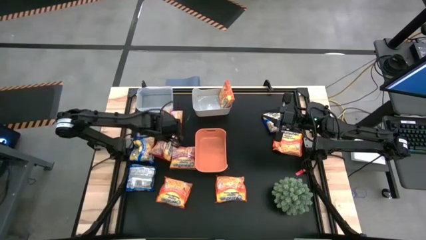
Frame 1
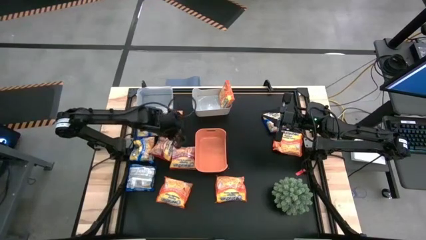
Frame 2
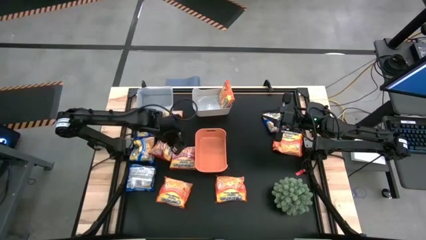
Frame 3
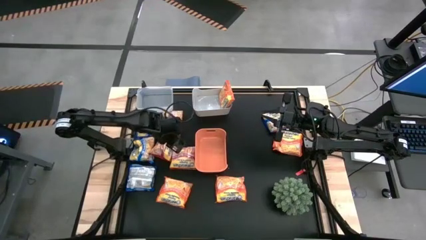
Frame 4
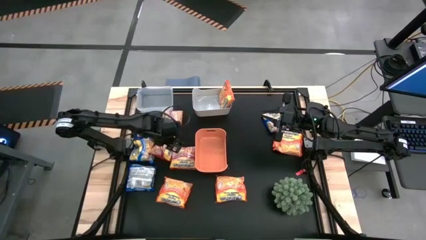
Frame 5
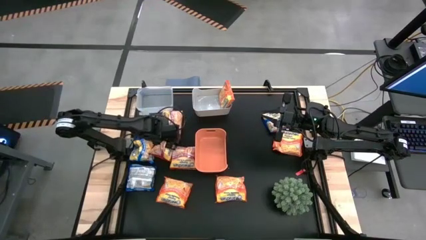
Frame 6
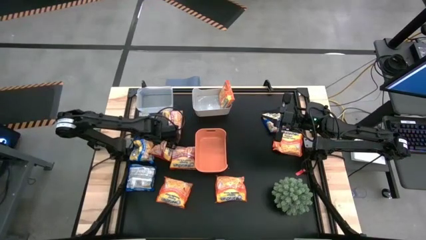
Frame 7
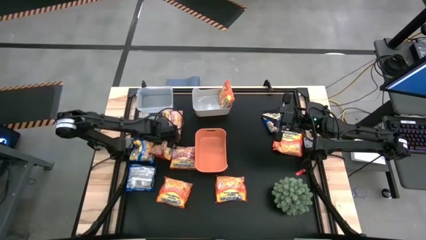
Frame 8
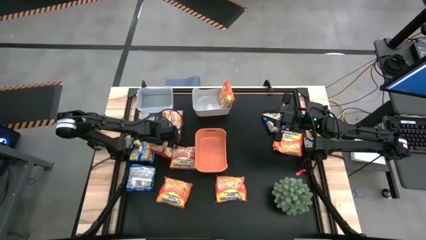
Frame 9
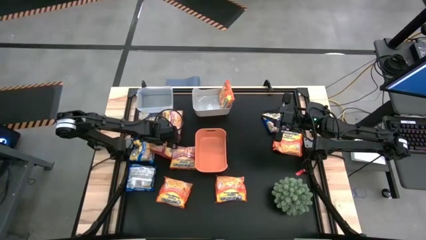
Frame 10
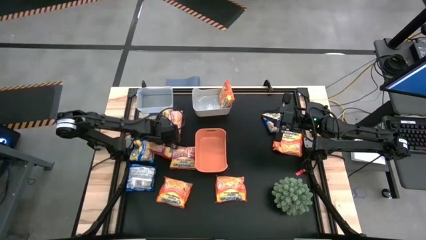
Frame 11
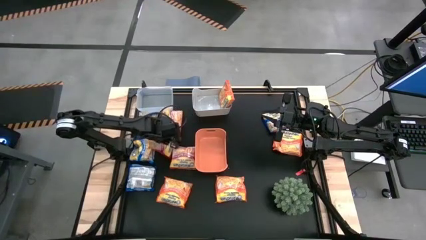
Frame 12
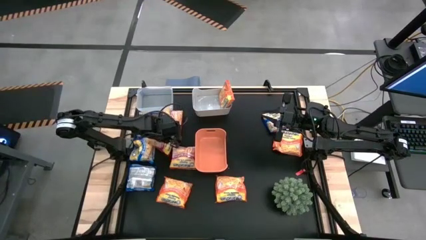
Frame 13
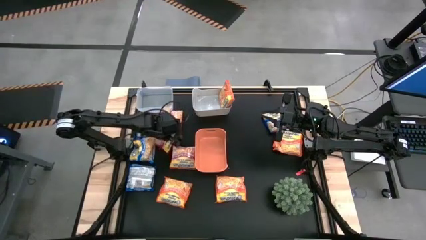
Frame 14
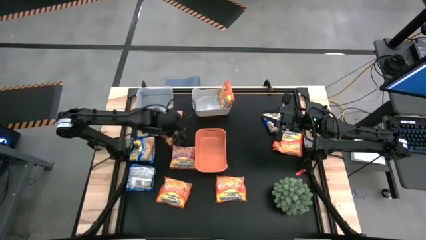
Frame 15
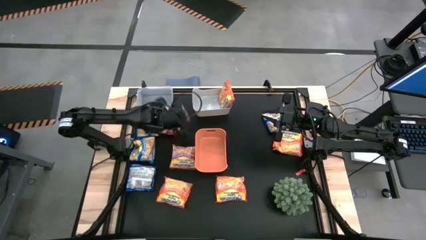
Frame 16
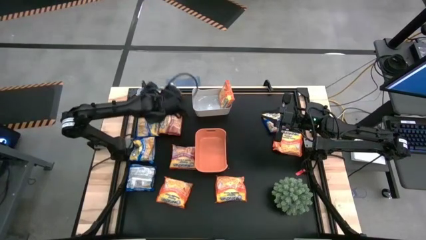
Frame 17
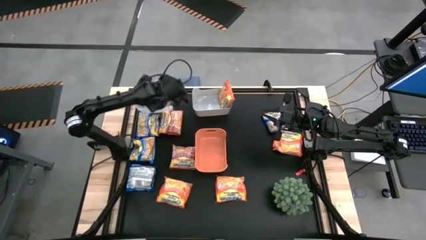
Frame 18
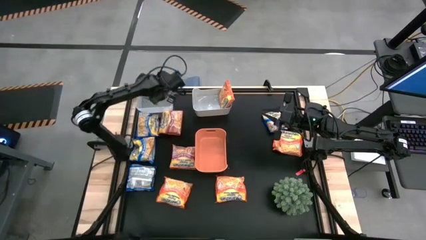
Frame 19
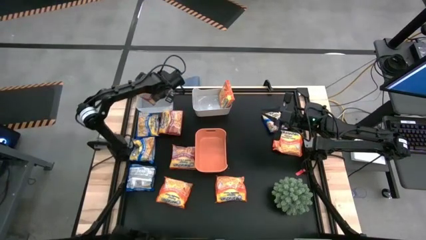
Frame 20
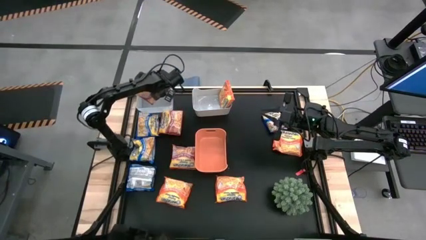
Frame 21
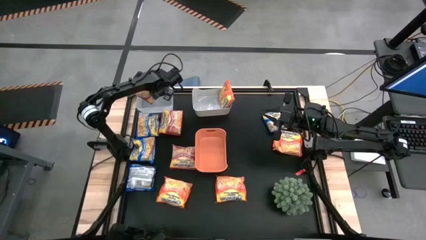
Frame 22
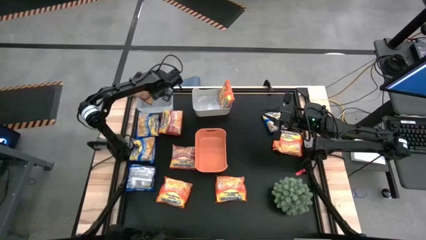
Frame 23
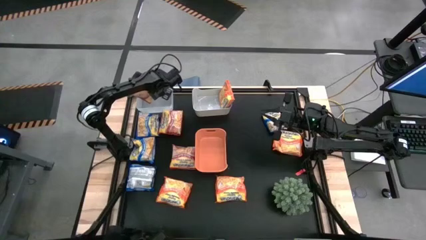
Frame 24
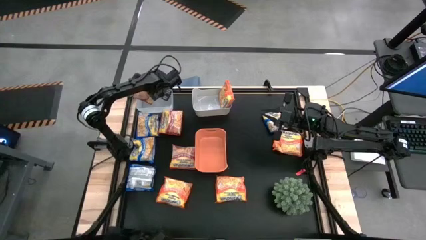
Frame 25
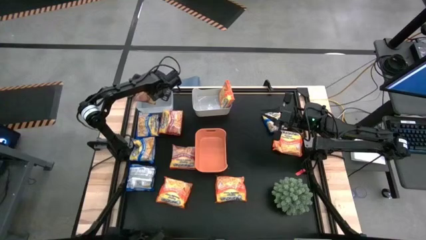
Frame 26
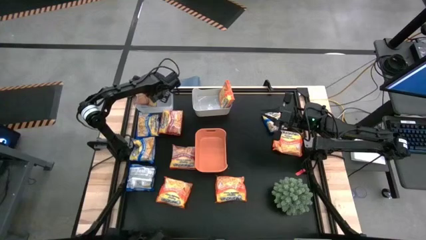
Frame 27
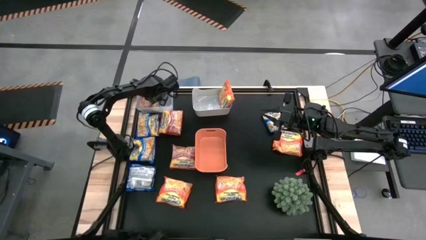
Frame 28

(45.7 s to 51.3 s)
Task: Sort Maruchan noodles
Put the red bag into the transparent bin

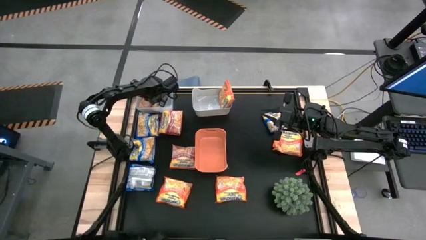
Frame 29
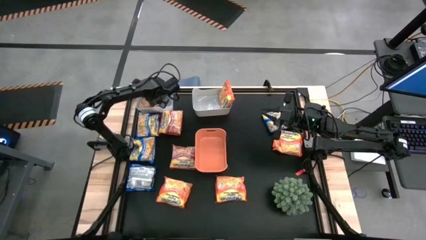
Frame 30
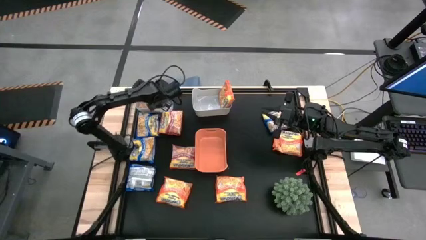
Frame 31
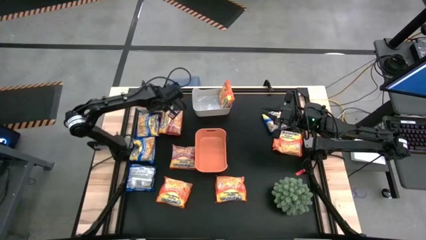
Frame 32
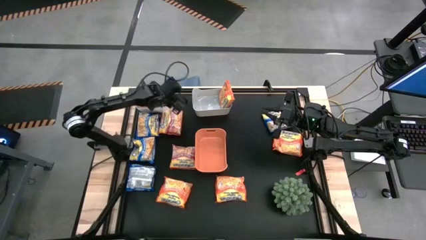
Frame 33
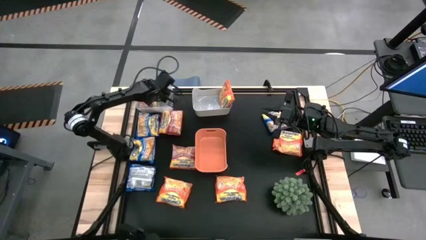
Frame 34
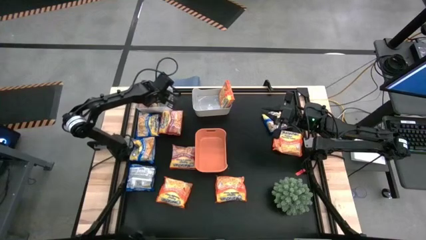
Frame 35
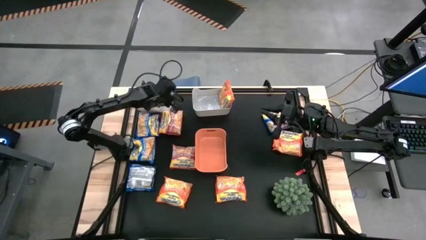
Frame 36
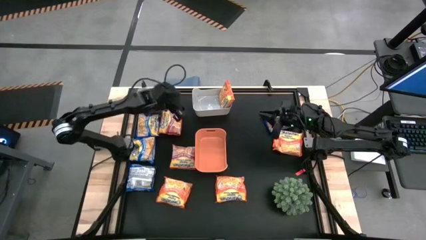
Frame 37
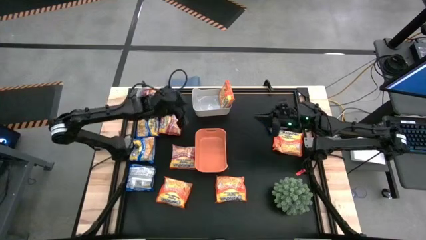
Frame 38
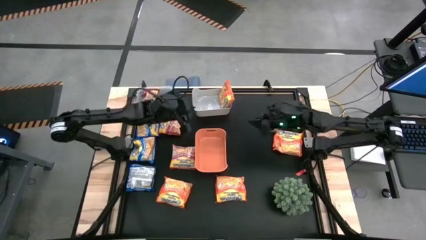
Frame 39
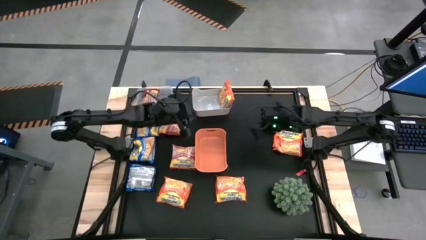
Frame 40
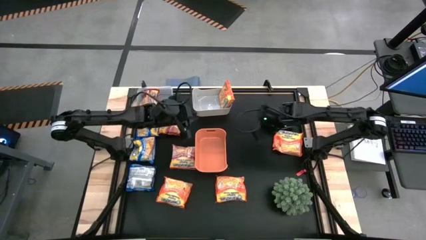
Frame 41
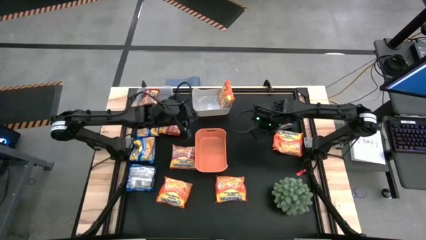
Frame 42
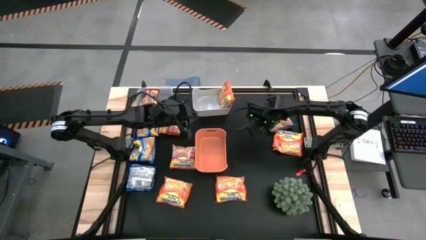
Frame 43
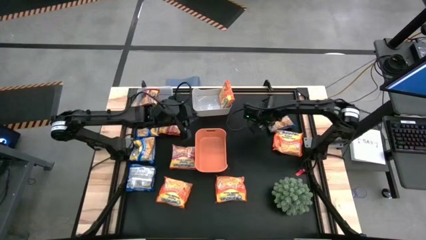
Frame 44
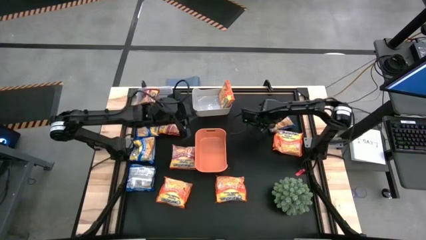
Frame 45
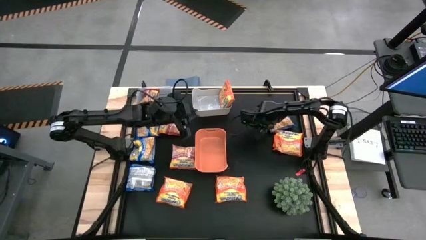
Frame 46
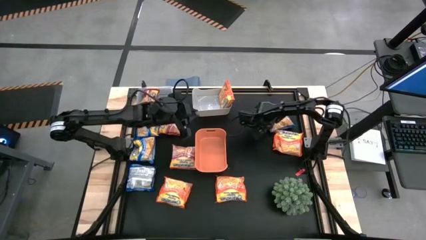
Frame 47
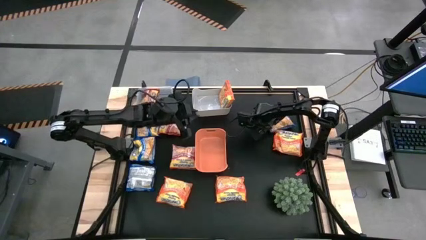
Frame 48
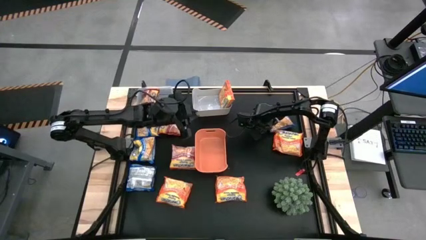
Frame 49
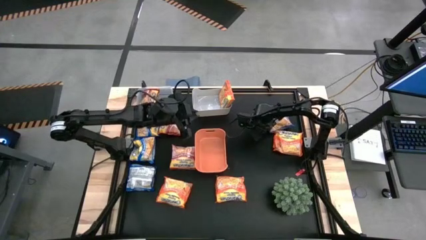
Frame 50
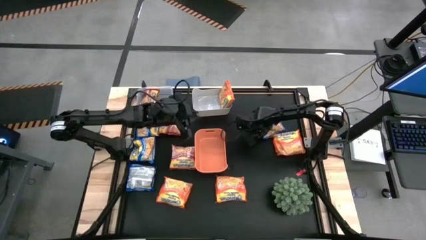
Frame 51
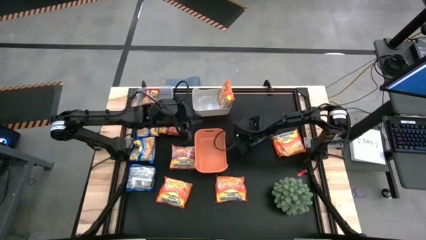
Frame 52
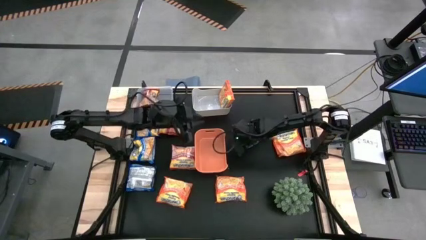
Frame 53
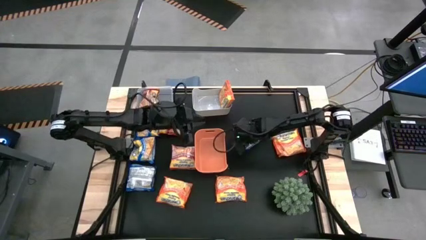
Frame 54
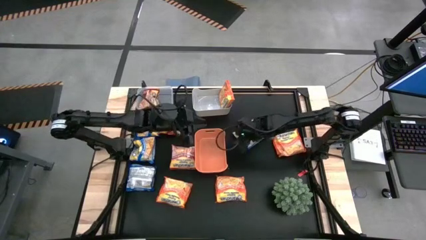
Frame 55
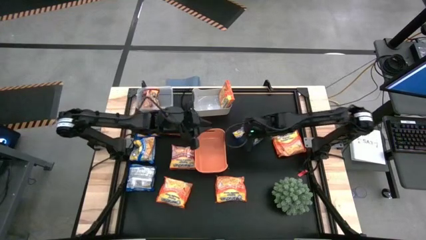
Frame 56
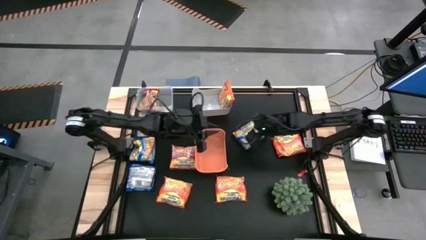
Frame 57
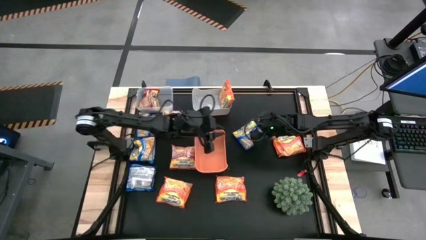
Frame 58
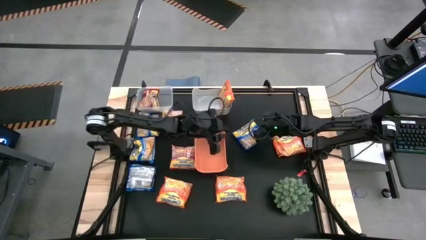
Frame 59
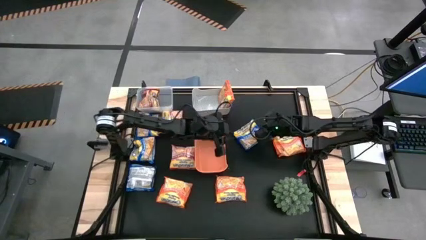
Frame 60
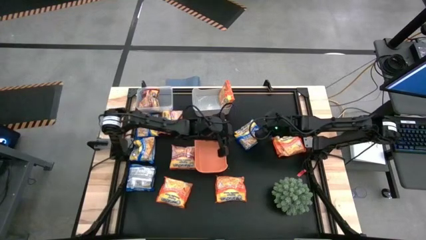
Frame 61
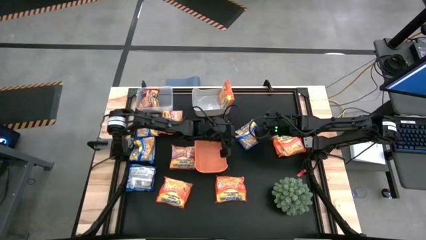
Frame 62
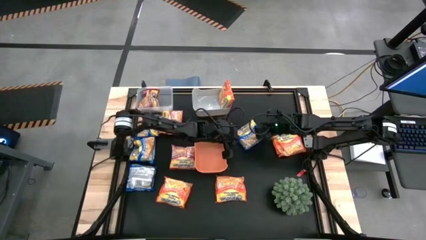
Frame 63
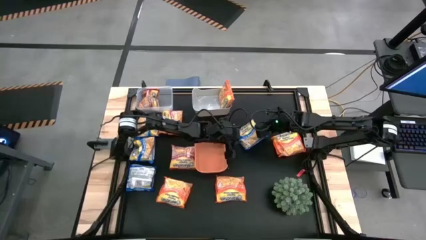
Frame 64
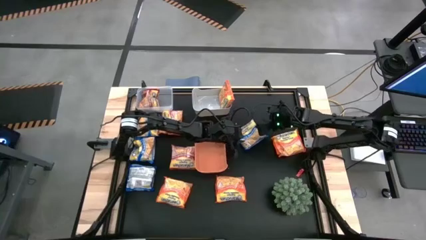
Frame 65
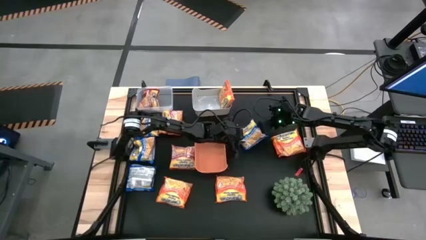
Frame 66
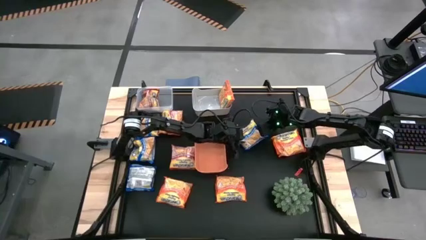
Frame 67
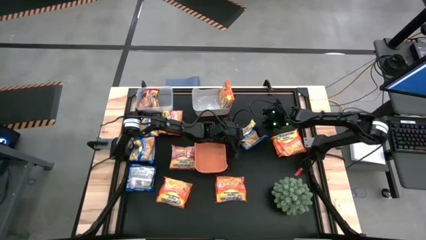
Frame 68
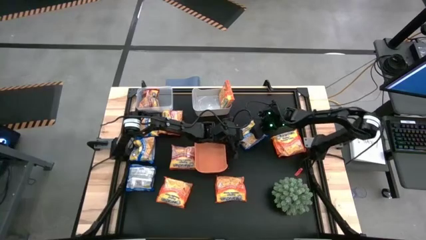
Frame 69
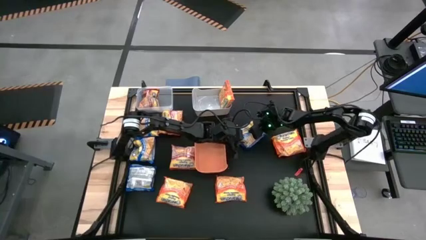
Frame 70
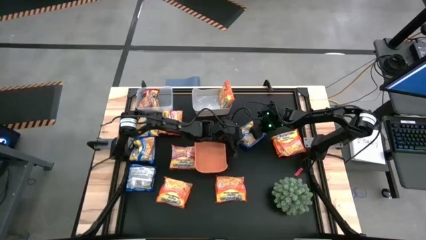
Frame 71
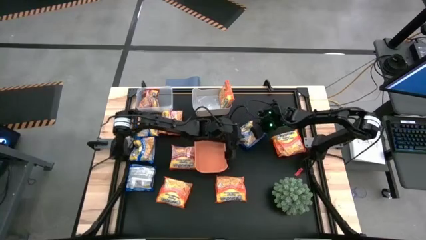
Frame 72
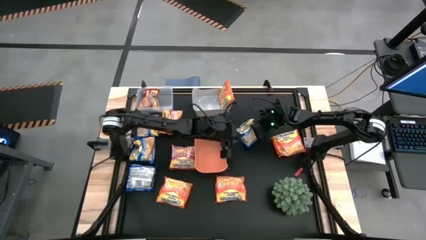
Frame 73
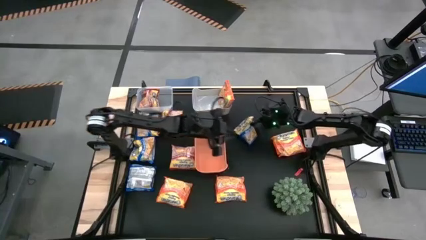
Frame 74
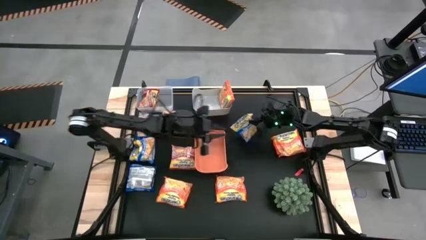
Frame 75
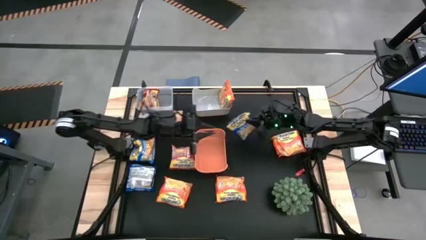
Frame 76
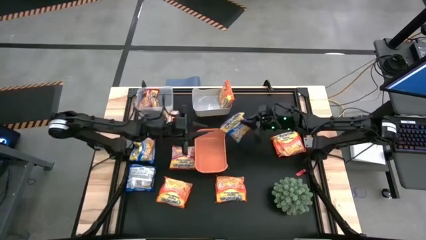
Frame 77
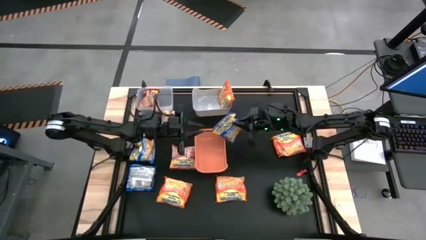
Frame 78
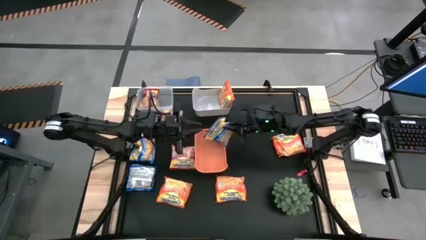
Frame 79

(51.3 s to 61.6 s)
Put the blue bag into the orange bin
